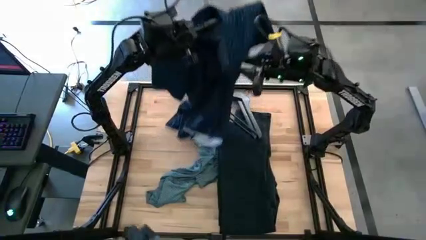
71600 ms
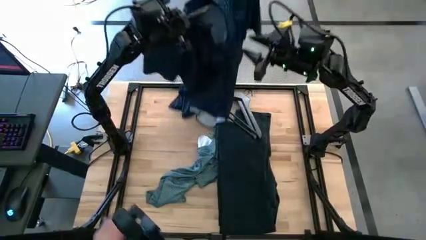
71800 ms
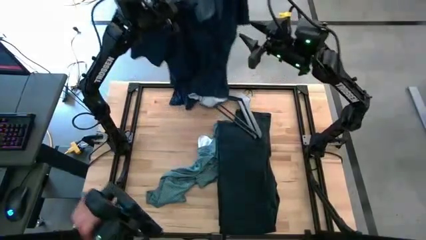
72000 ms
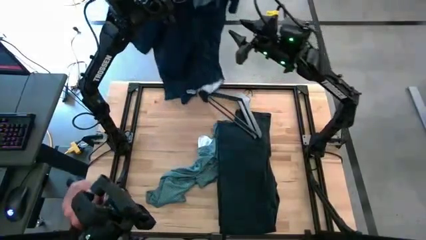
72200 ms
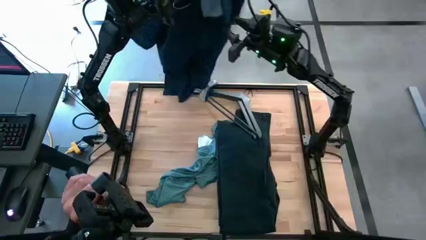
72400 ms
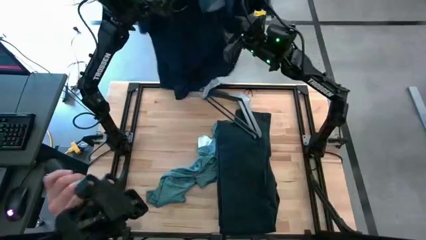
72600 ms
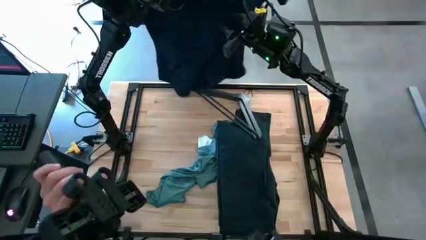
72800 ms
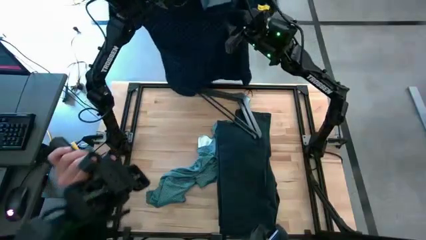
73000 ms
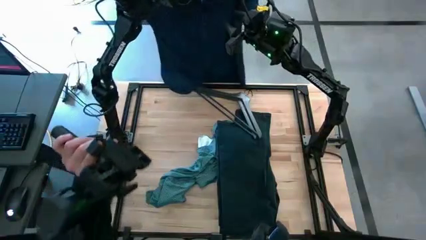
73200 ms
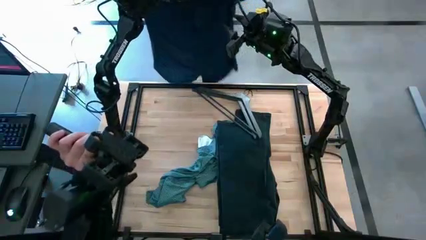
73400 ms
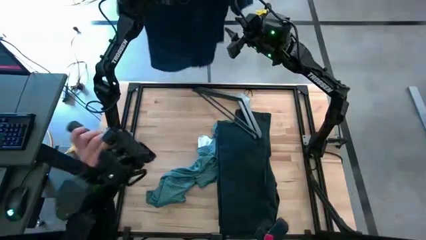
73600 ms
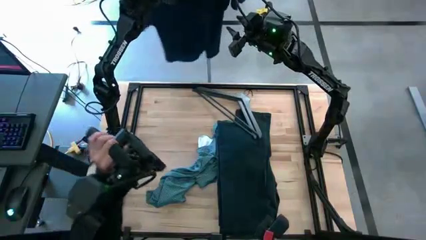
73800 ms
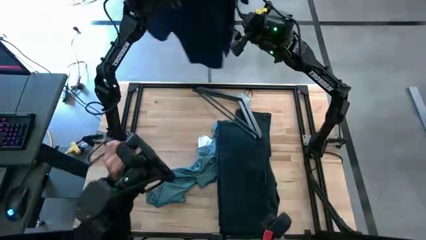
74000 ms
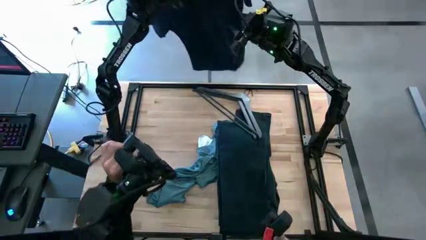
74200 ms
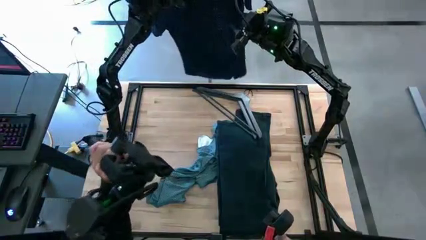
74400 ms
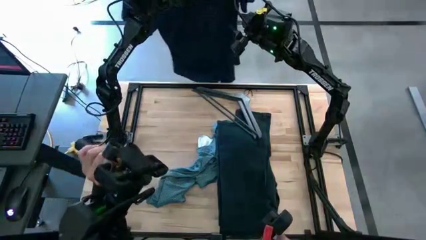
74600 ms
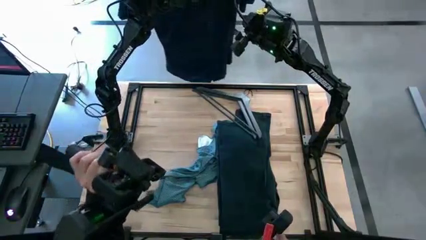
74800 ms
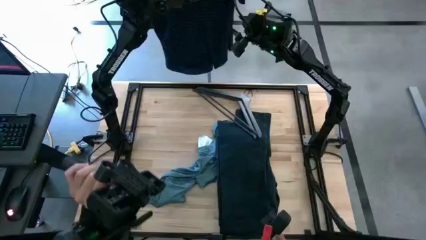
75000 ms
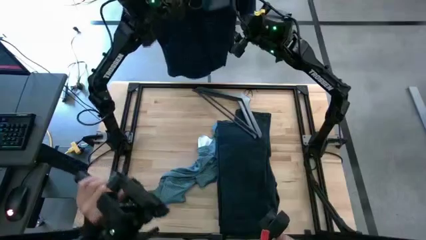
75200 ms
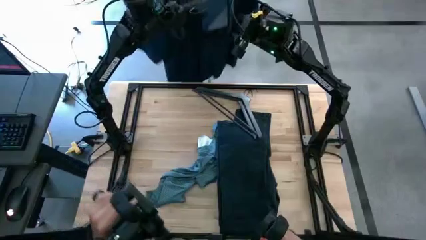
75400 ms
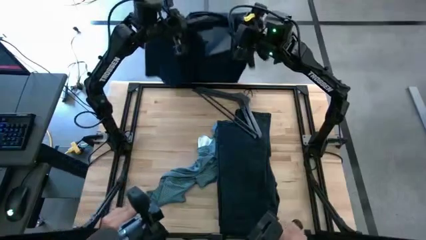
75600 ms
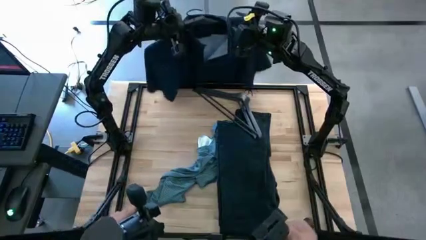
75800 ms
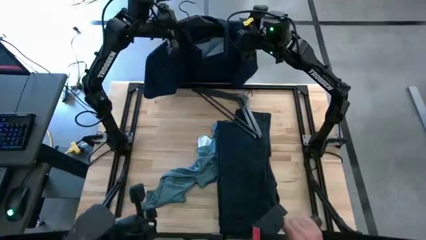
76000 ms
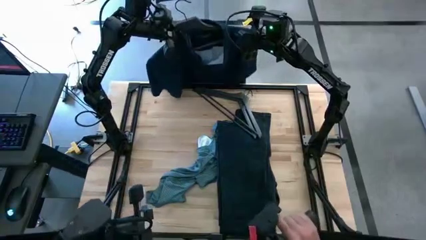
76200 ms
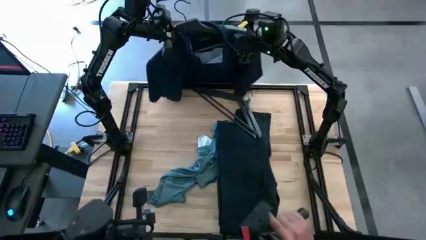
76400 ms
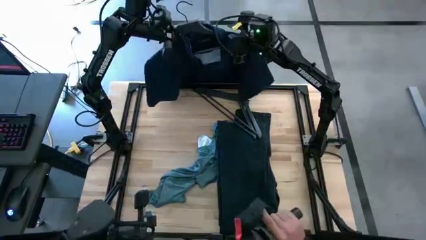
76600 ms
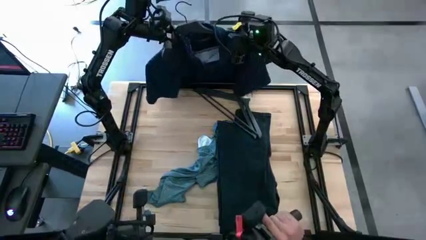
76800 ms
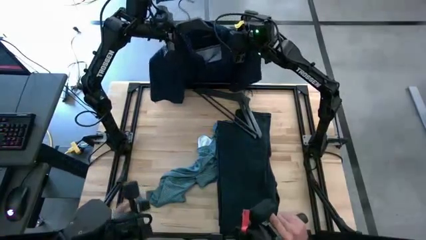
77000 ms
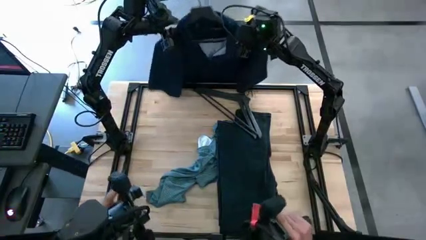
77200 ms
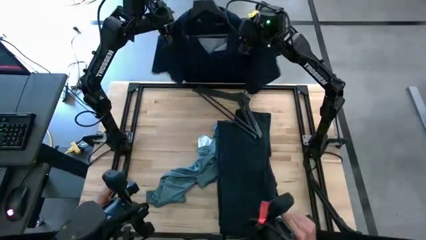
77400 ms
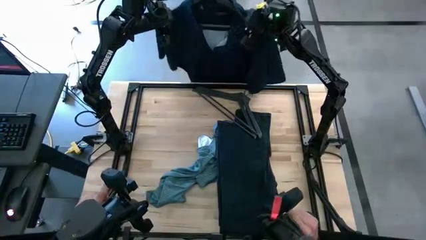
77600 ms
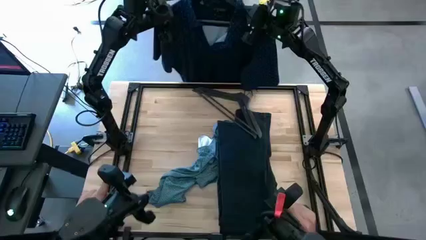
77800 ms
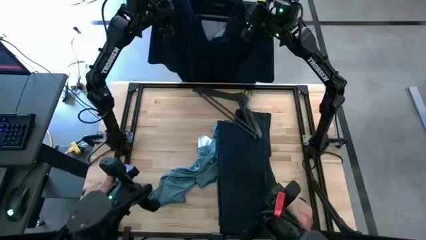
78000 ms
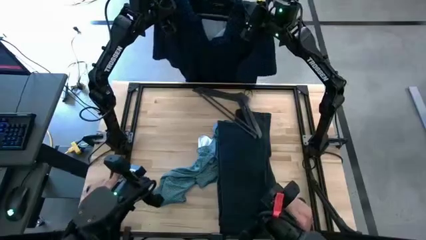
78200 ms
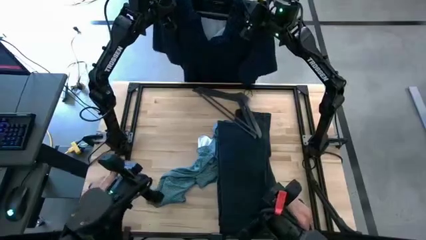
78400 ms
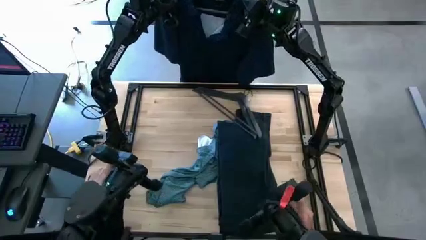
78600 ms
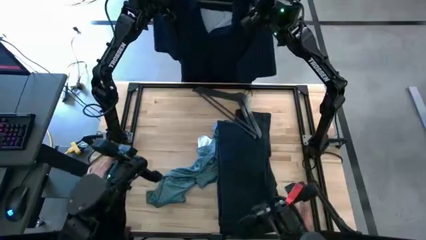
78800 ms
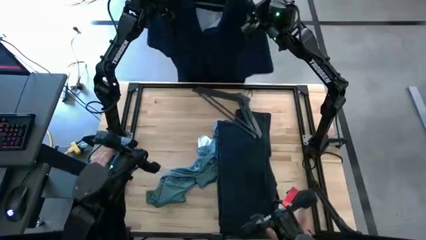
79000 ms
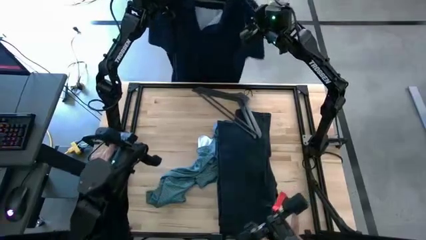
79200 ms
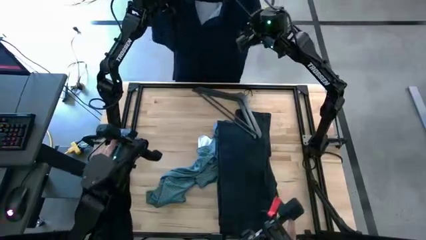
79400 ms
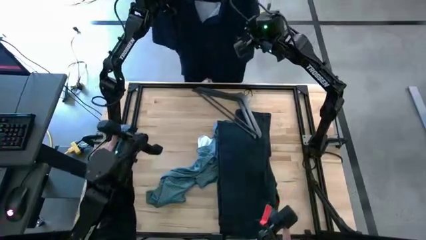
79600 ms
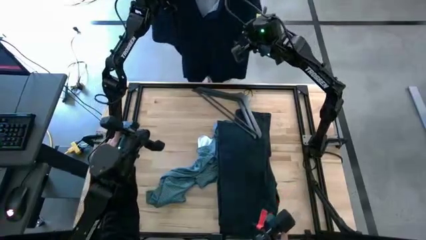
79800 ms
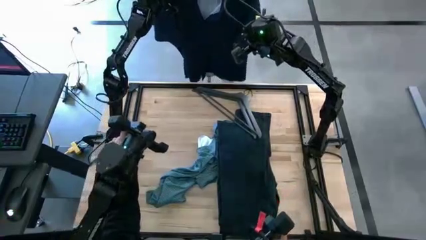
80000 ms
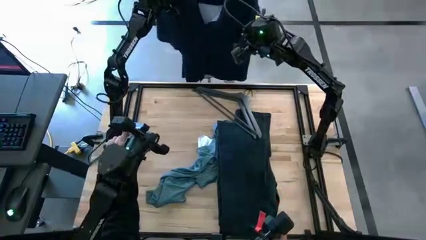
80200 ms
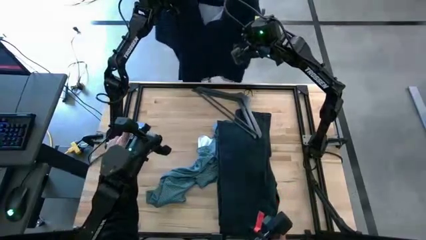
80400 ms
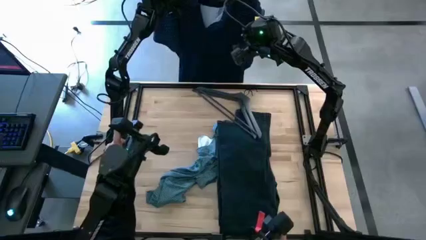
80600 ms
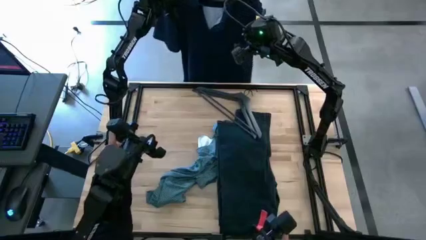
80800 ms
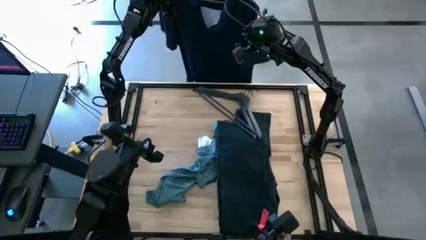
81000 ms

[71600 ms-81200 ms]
Task: Hang clothes
Hang the hangered blue polo shirt on the hanger rack

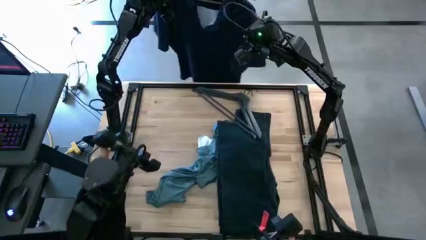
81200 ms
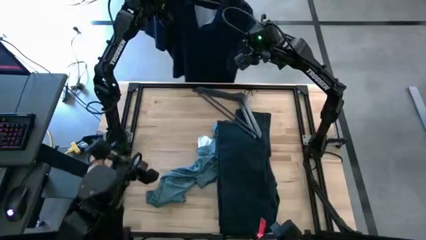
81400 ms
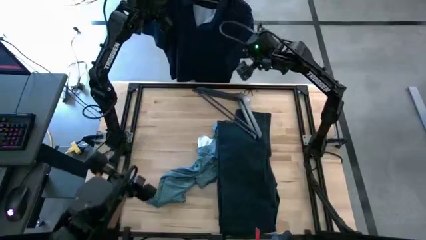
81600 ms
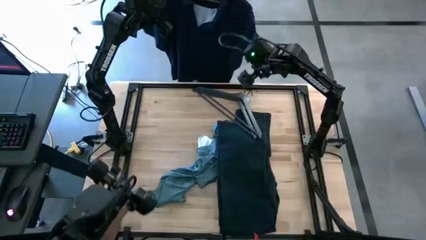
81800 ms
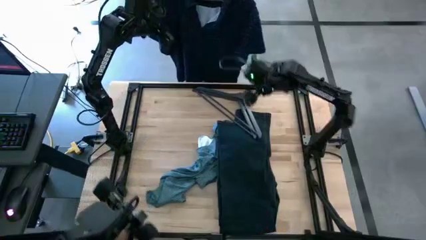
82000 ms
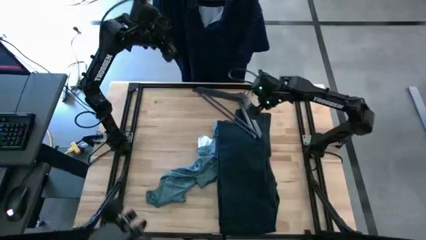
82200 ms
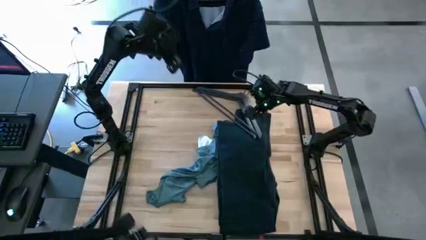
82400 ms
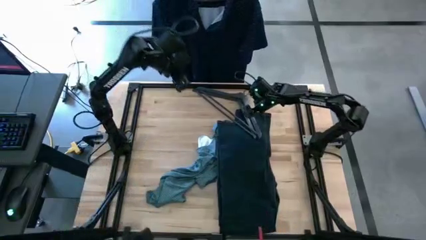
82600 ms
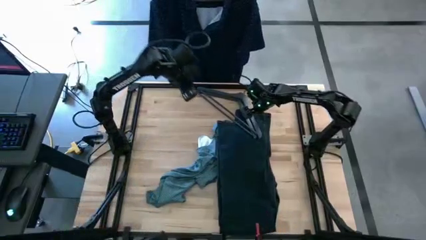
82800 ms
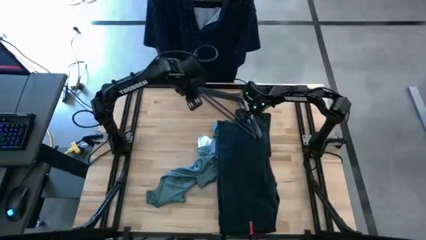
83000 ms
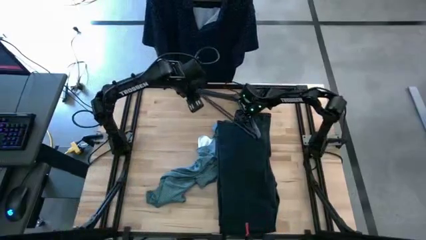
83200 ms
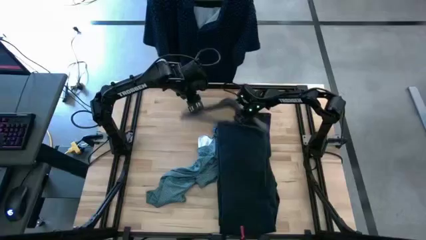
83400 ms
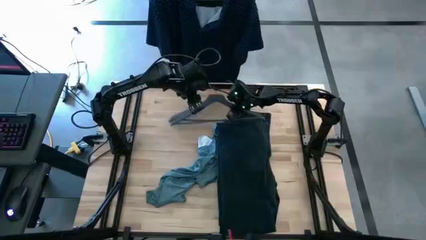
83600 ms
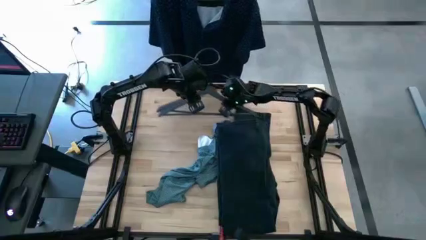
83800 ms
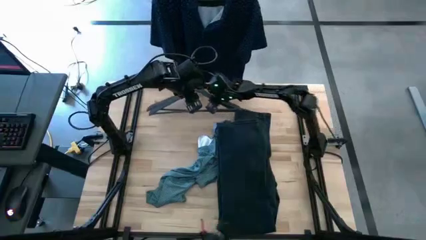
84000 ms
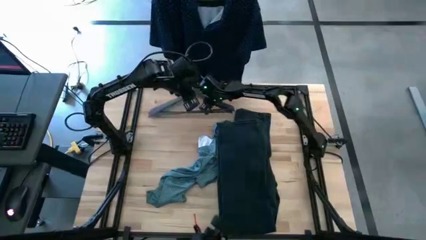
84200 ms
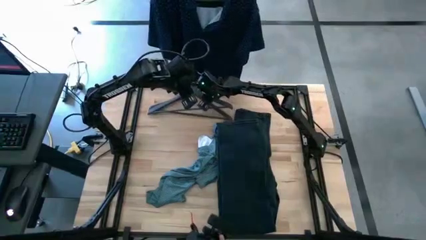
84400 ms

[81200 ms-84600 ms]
Prepare the hangers
